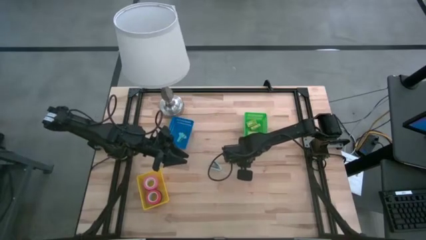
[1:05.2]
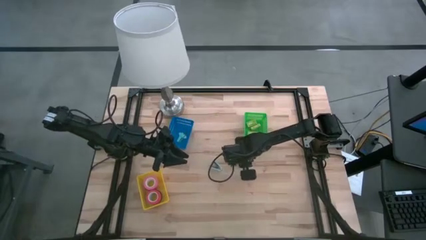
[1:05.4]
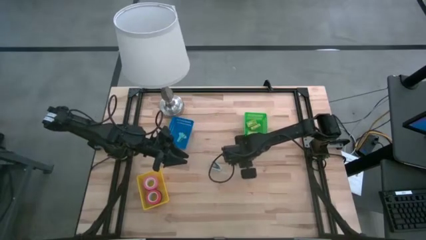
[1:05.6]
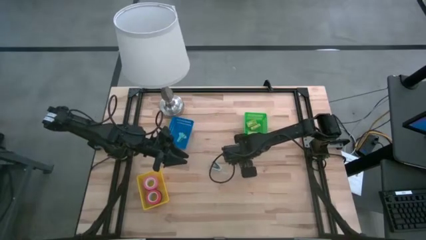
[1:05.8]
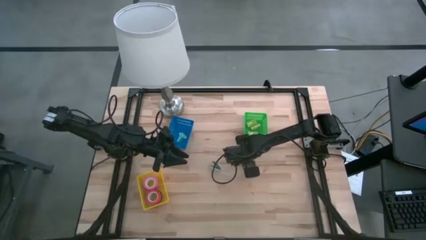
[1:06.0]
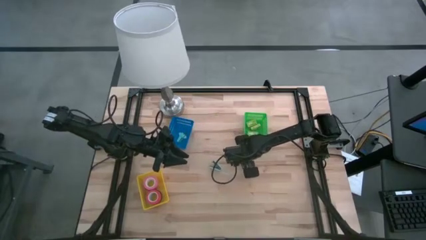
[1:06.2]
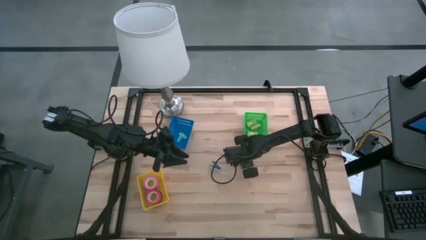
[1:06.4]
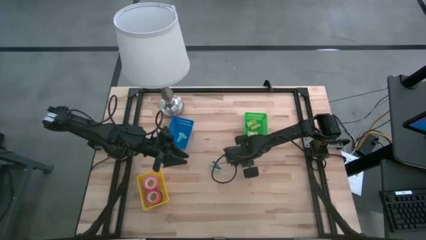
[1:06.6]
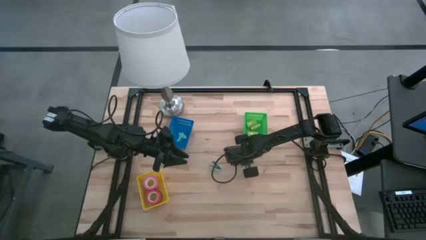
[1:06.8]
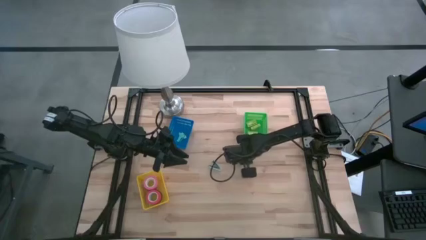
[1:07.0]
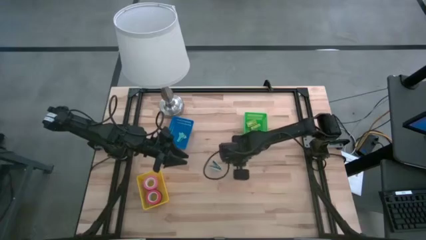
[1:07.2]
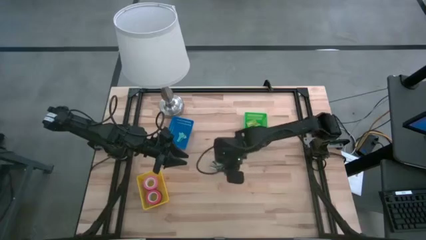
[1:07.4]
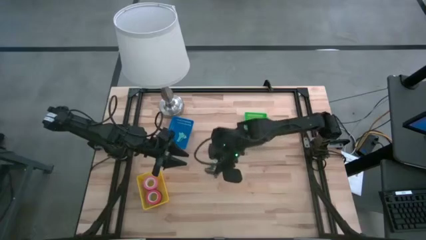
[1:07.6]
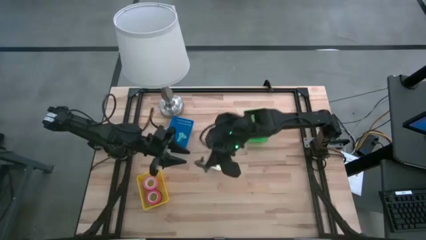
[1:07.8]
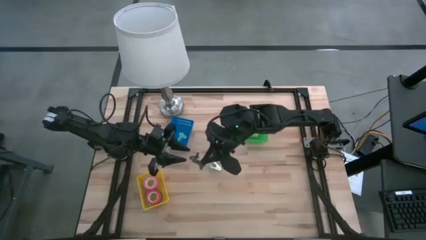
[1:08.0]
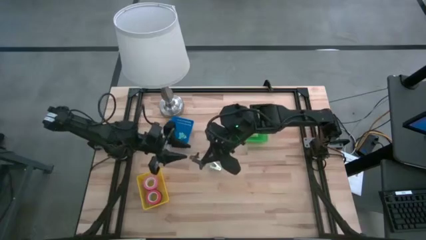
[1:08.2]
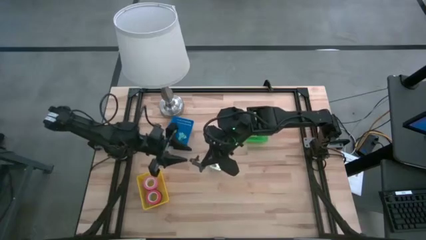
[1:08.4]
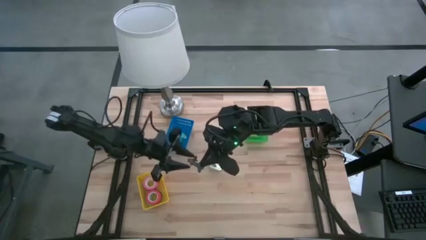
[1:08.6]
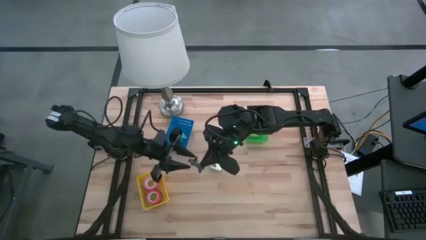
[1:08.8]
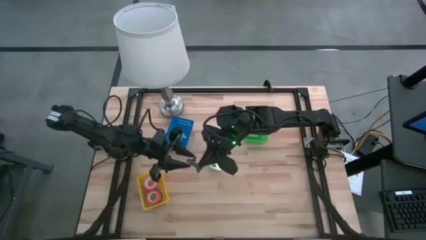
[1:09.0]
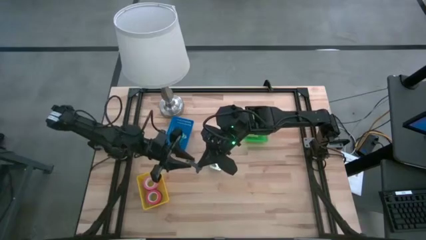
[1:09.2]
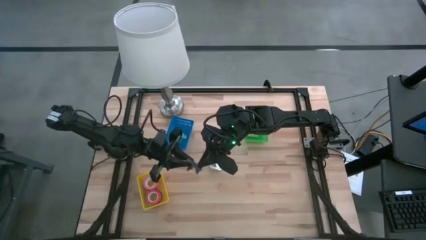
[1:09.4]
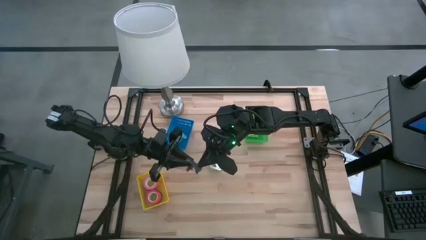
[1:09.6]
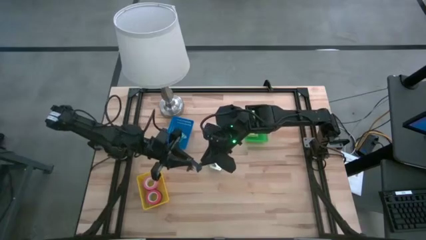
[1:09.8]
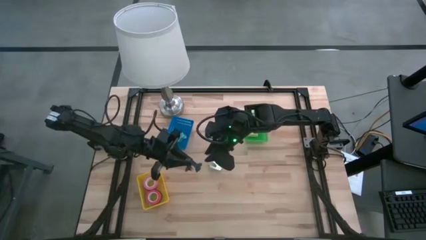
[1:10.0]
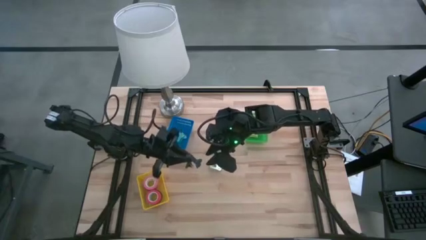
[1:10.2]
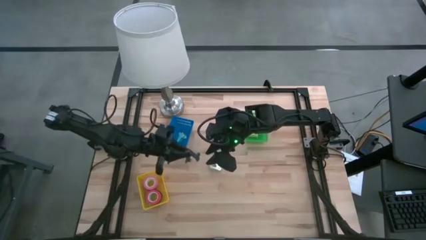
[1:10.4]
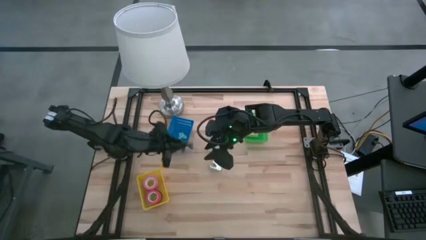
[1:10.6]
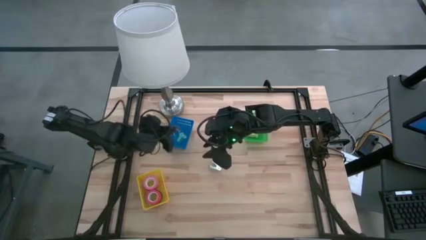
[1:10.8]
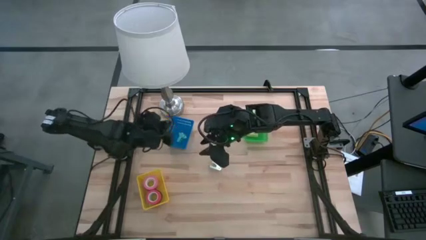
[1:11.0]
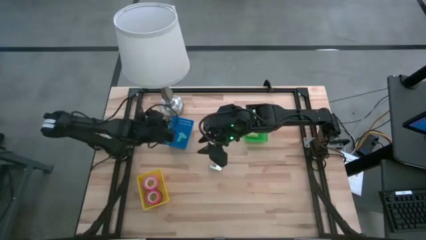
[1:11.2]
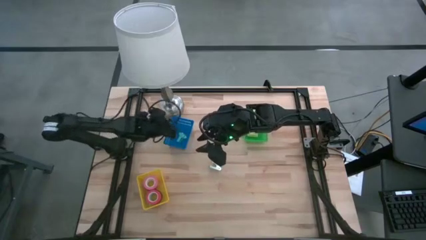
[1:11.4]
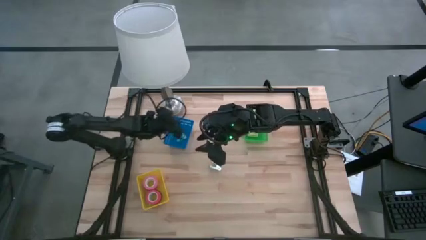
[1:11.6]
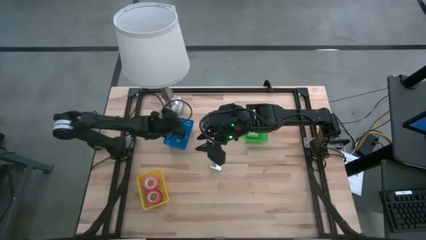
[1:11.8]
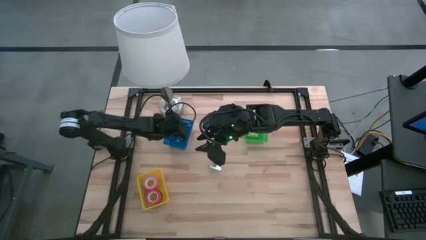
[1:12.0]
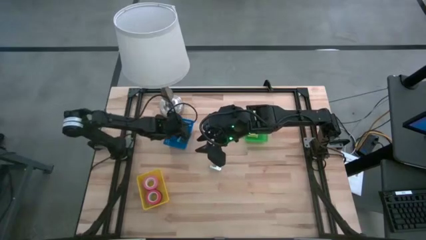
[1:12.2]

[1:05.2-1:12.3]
Task: Pick and place Stapler, Stapler remover, tape
Put the black staple remover into the blue bin

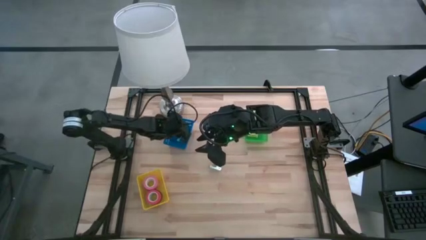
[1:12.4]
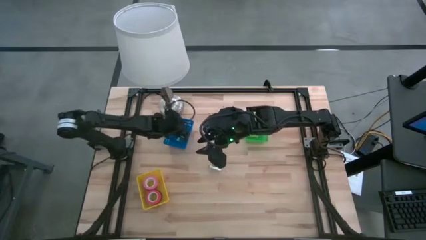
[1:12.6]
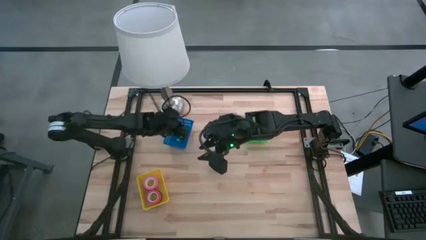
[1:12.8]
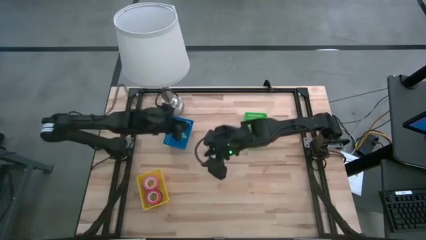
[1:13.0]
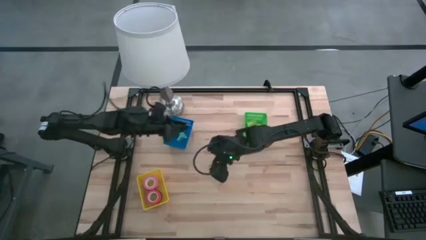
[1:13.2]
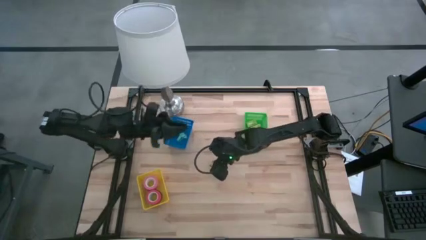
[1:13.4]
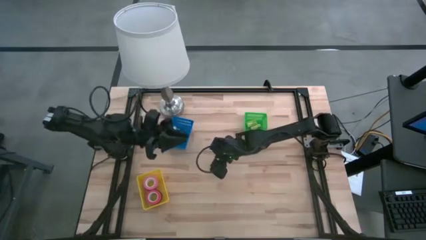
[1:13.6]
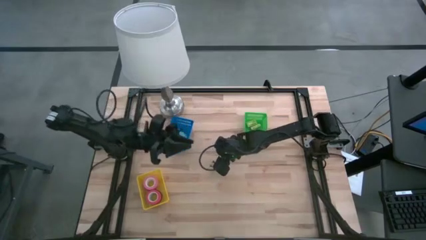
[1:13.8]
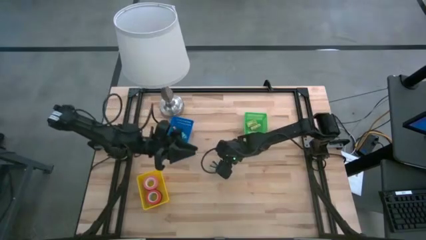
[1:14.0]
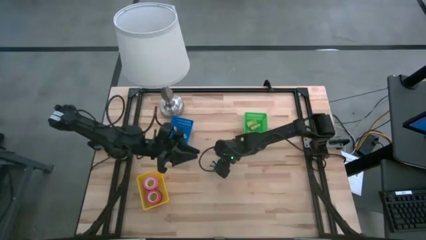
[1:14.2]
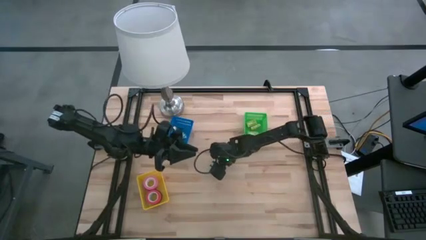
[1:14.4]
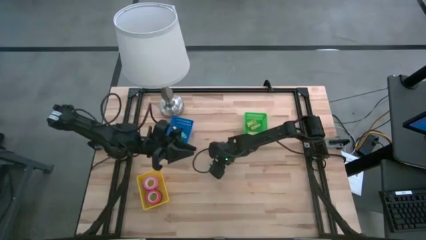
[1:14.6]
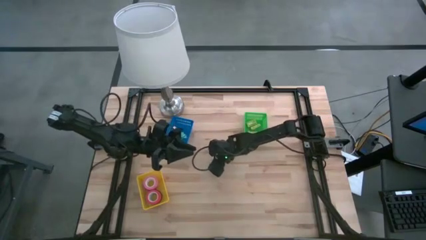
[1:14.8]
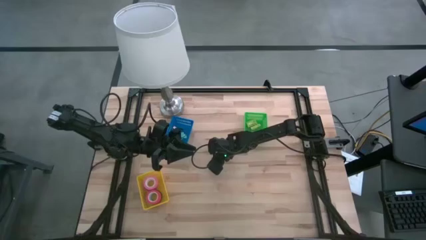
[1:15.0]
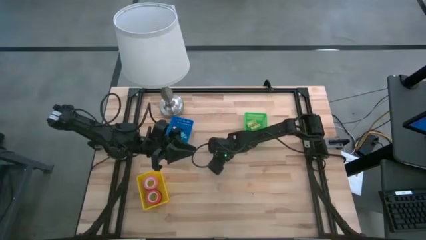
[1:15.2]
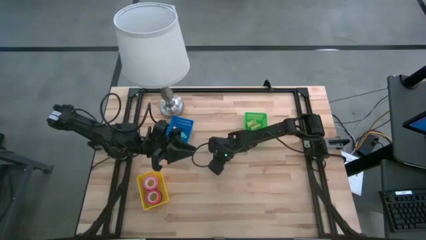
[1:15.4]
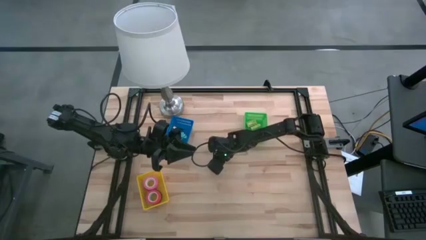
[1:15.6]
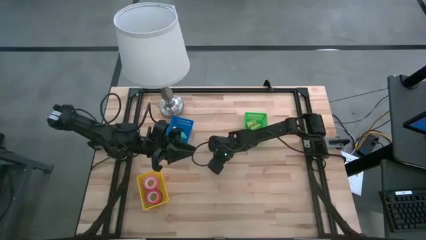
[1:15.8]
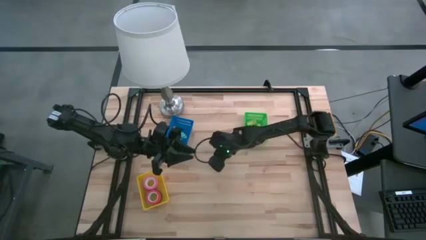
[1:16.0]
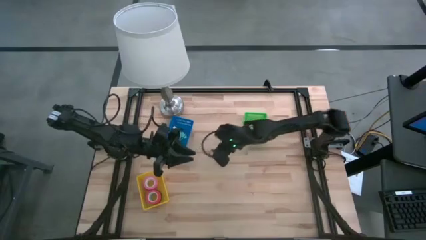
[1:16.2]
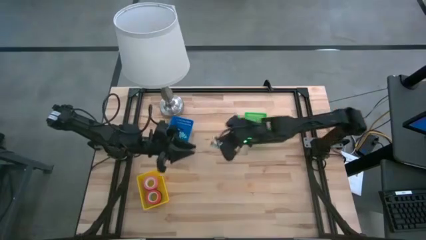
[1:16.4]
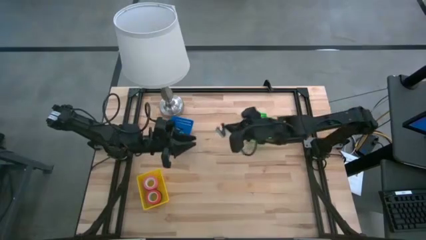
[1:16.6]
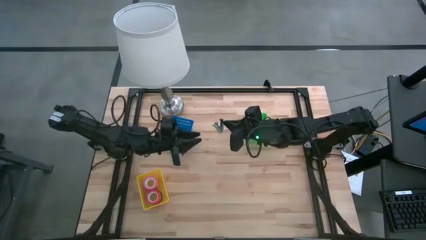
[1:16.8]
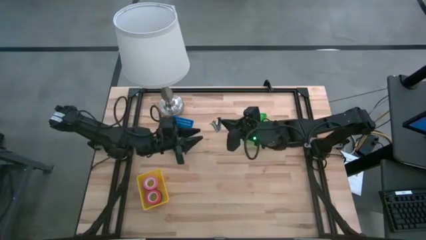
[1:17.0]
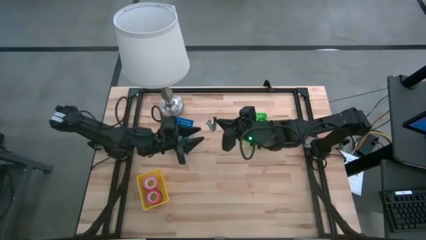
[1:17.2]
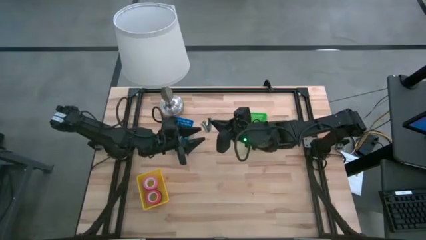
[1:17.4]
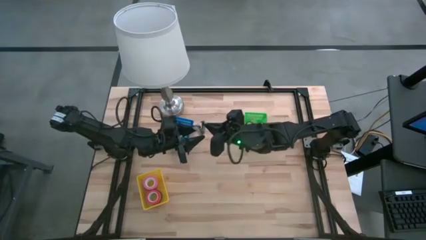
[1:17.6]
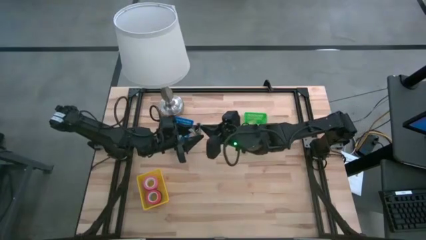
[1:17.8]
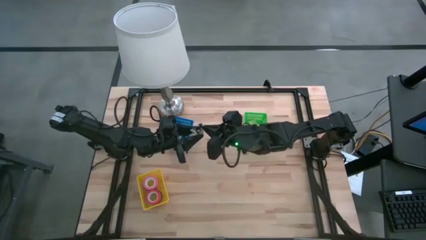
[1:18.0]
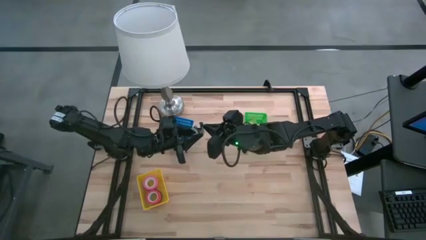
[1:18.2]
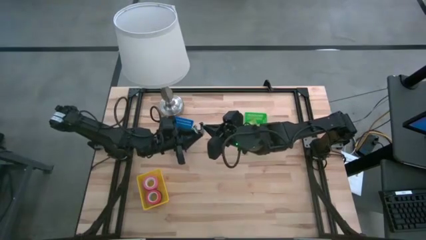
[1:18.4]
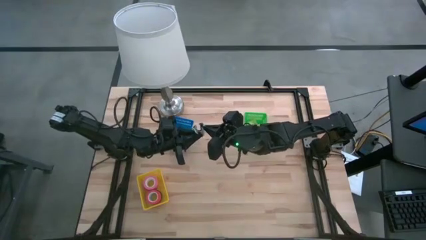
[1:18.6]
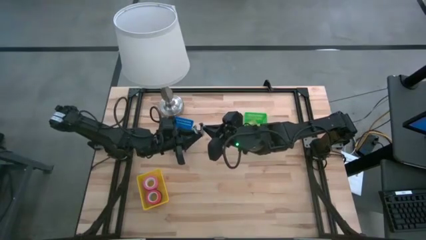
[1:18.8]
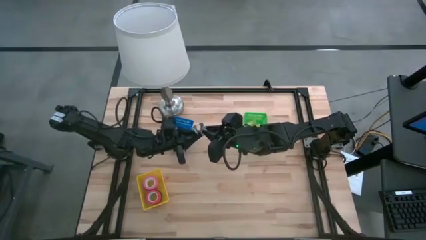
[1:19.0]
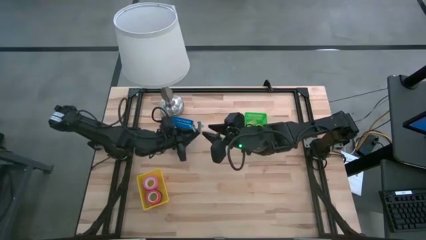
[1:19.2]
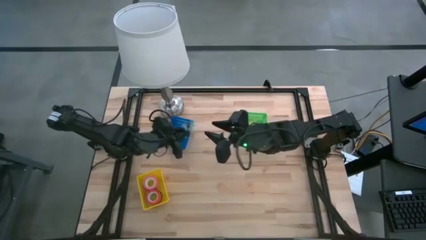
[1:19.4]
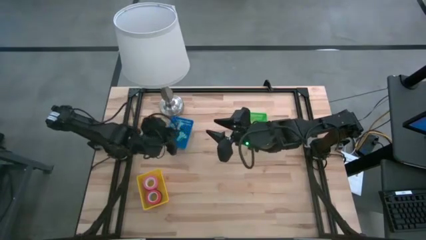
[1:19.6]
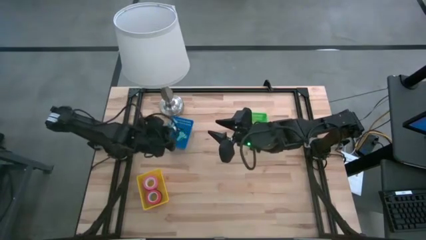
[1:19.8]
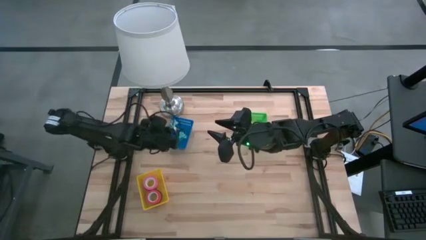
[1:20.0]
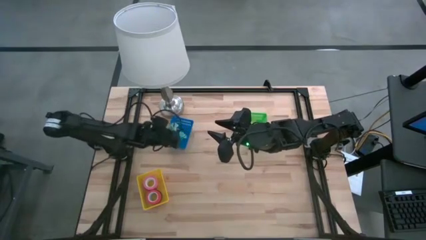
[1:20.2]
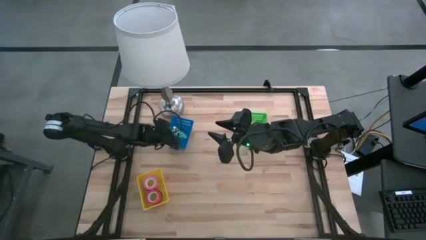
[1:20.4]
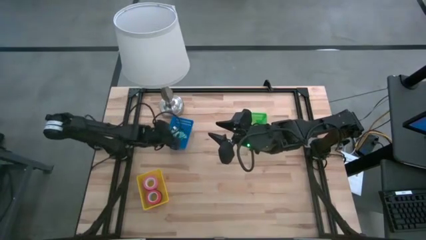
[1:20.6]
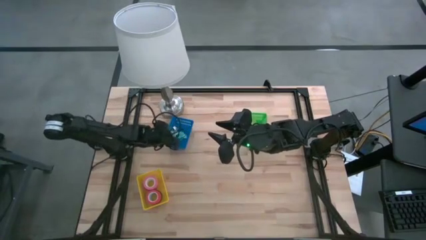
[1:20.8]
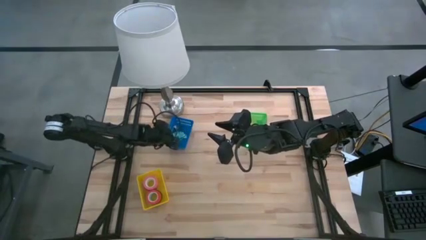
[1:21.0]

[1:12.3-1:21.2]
Put the light blue staple remover into the blue bin

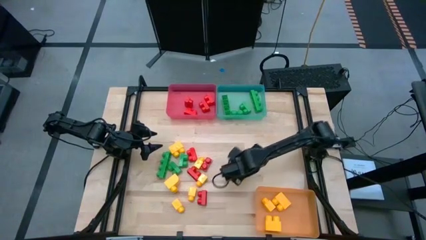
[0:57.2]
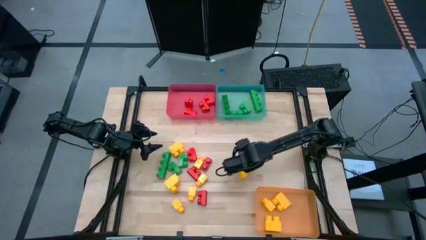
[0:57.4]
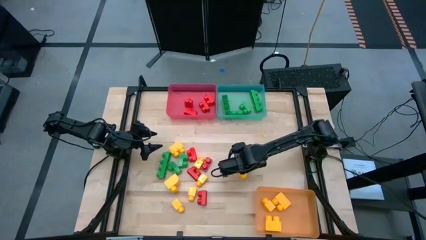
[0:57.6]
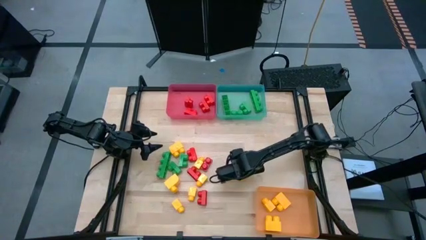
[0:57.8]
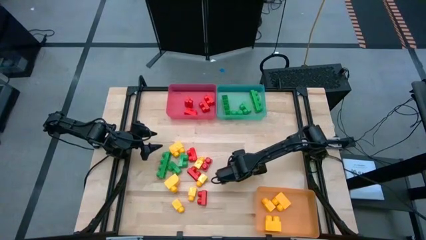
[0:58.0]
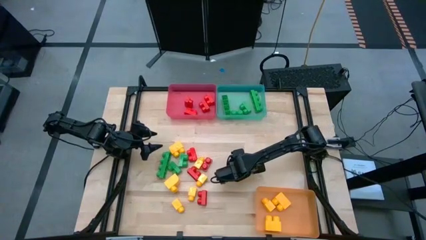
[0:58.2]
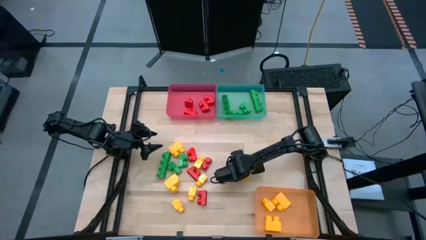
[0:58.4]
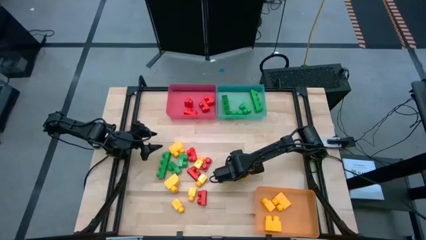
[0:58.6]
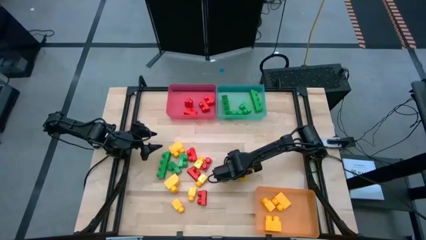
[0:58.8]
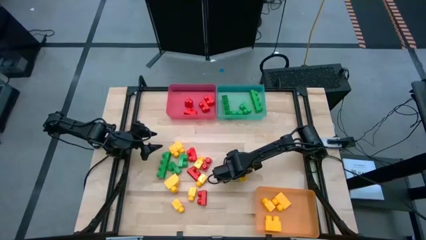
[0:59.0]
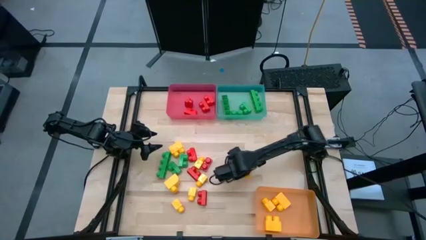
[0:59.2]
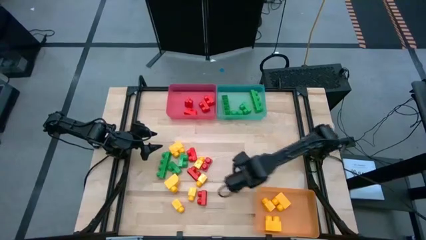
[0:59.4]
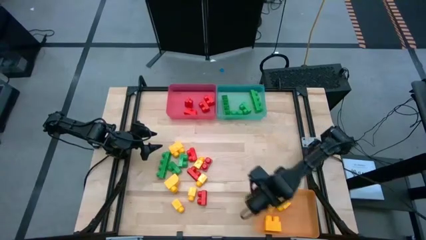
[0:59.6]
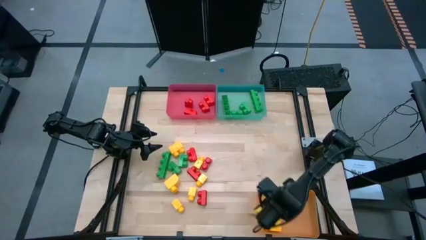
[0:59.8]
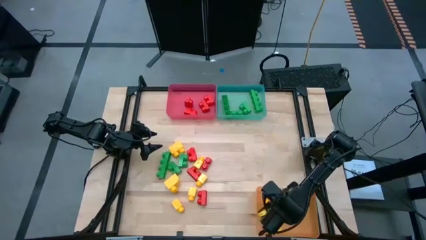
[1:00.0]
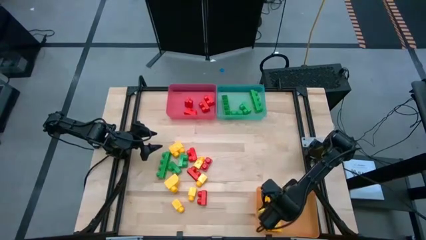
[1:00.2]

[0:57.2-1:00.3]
Task: Sort blocks
Put the yellow game piece into the yellow bin
